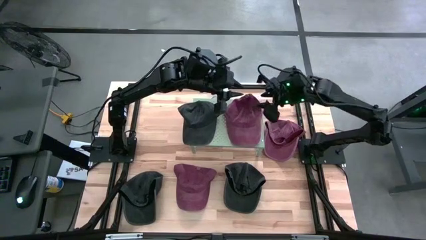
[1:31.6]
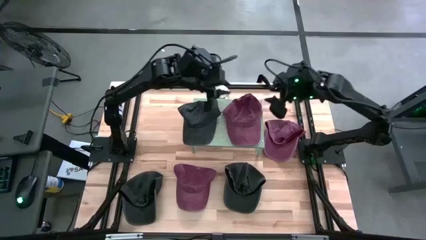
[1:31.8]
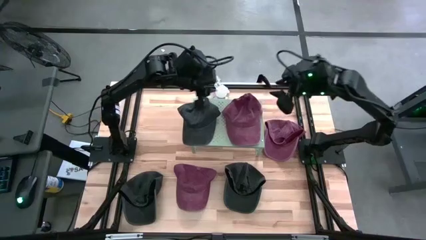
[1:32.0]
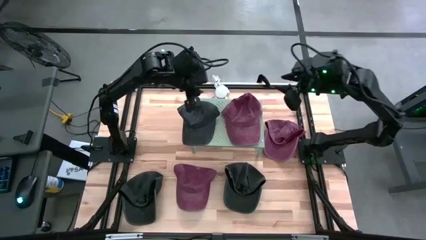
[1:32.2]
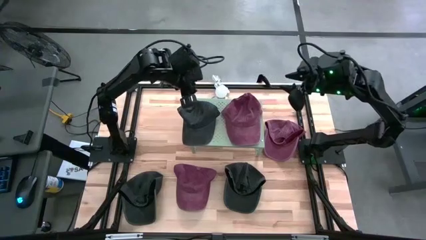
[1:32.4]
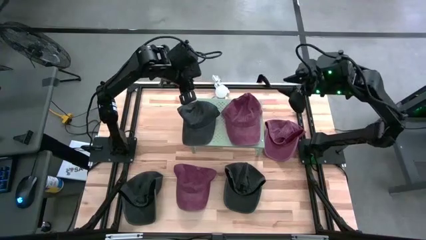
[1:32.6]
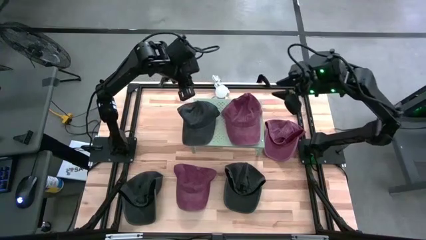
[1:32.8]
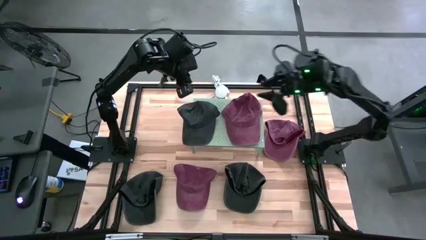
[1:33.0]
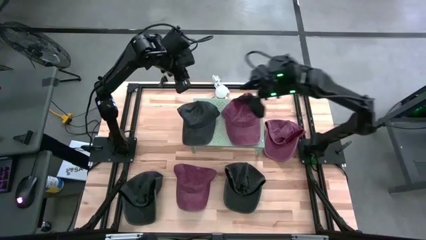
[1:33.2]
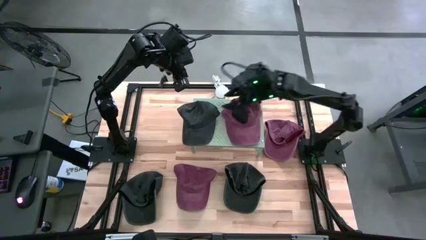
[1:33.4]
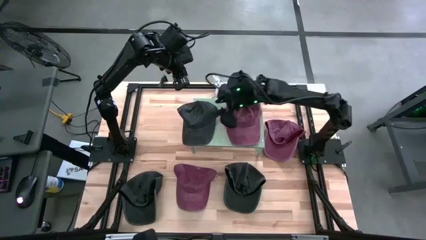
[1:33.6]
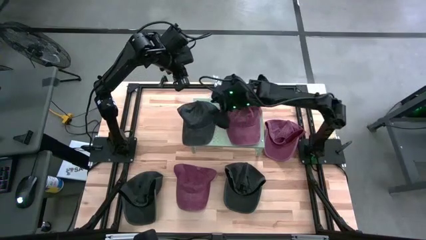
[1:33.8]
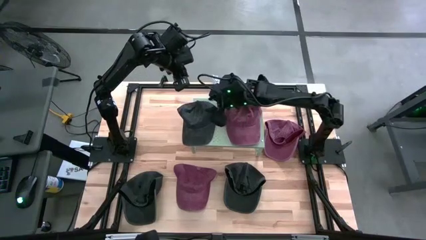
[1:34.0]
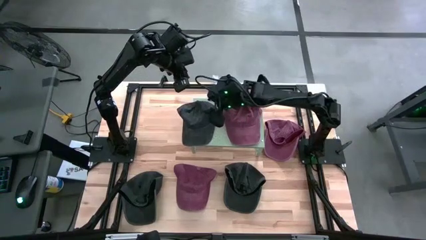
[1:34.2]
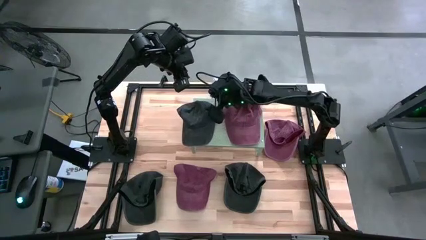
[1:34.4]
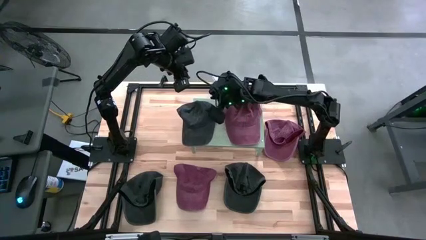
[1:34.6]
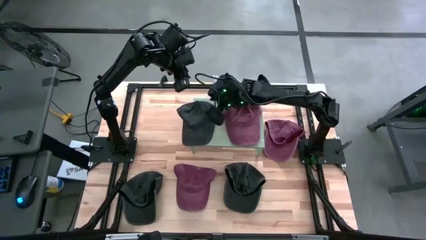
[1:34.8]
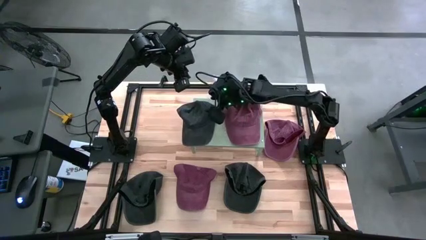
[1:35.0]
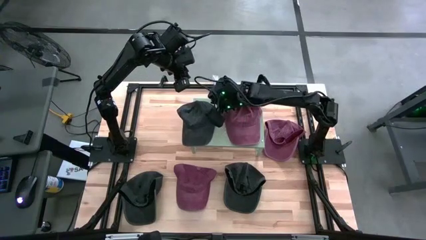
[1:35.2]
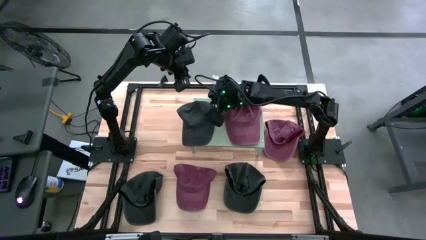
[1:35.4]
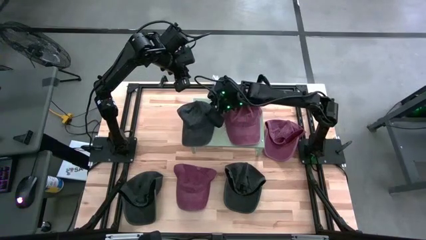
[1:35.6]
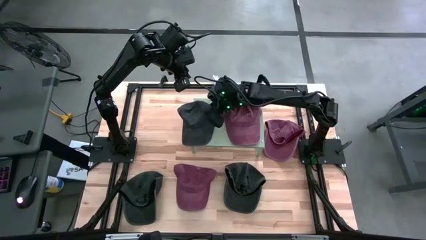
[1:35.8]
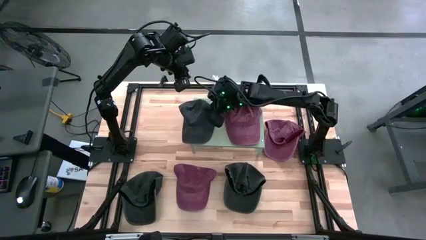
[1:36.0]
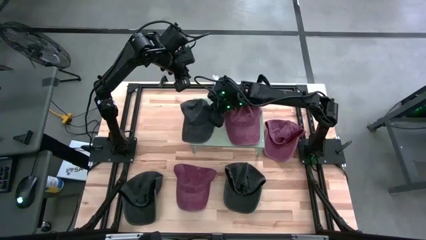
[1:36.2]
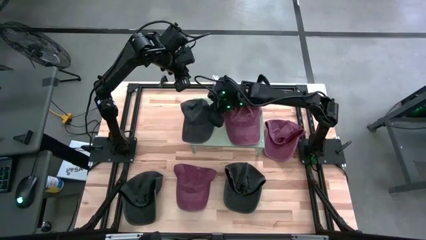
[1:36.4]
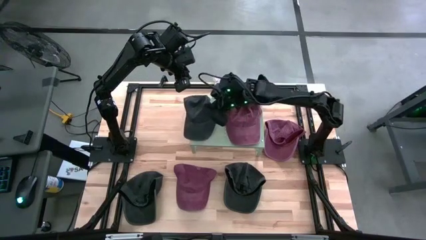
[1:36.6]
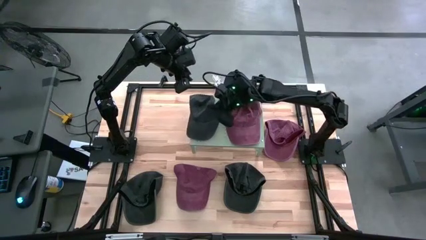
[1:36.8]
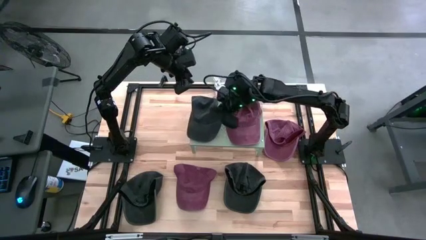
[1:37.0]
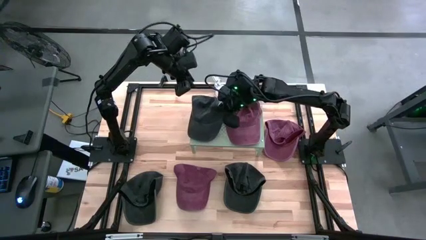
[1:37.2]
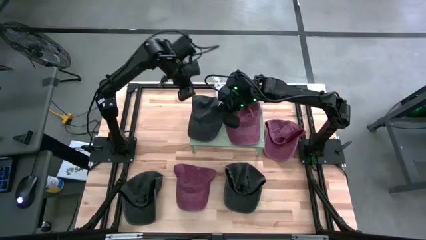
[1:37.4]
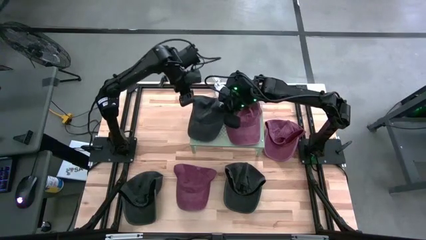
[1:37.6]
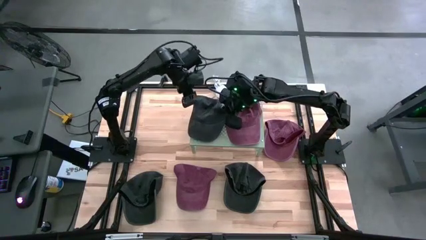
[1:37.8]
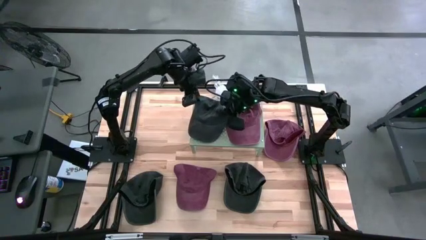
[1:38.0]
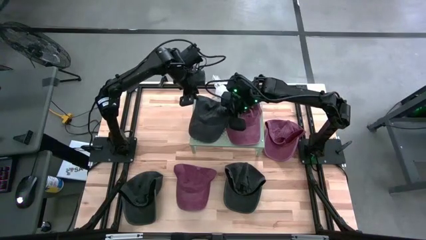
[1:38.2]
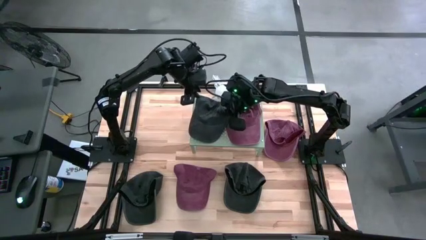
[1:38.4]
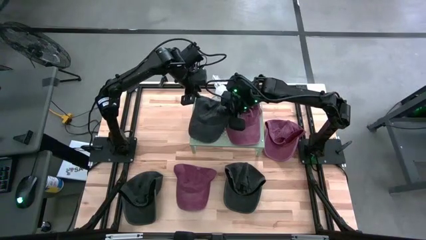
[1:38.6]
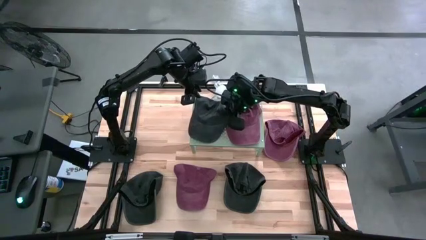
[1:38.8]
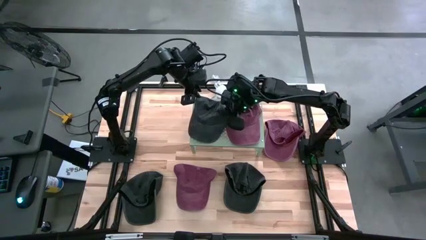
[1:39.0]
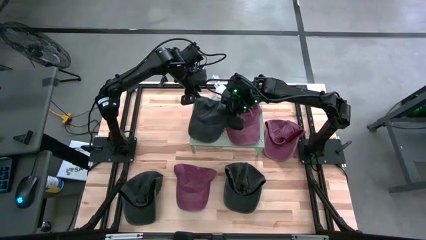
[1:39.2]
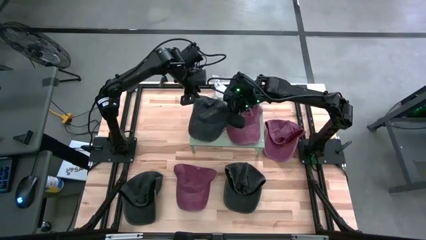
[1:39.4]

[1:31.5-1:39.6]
Task: Pick & Place hat
Adjust the black cap on the shelf

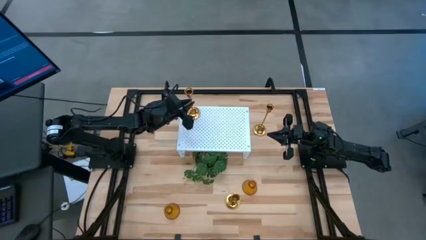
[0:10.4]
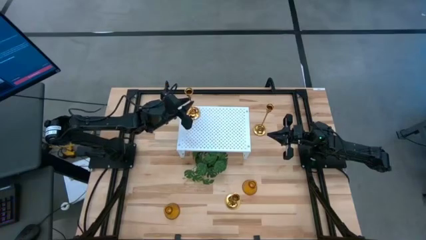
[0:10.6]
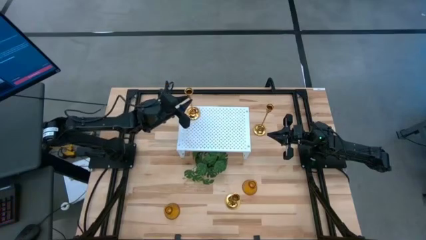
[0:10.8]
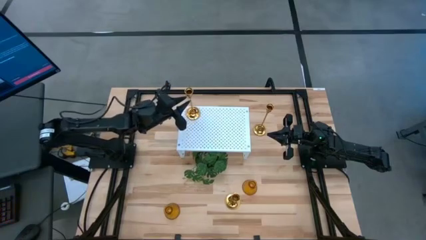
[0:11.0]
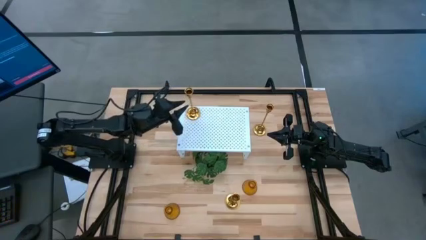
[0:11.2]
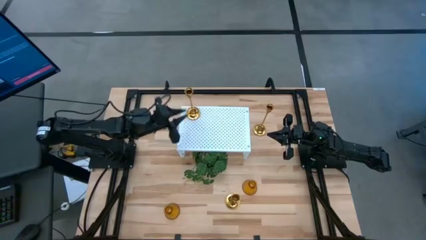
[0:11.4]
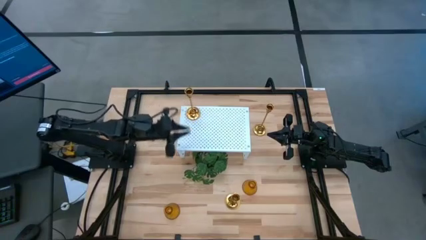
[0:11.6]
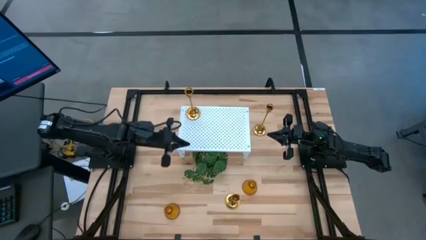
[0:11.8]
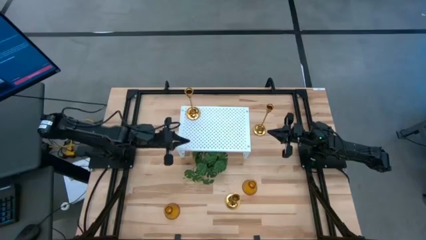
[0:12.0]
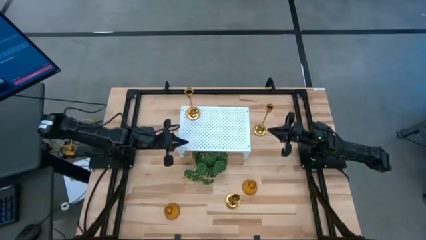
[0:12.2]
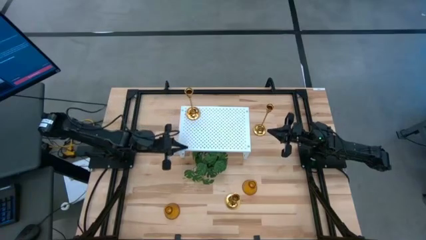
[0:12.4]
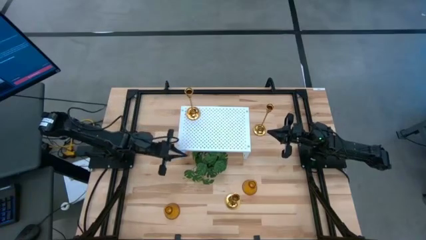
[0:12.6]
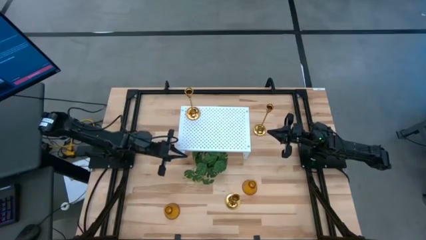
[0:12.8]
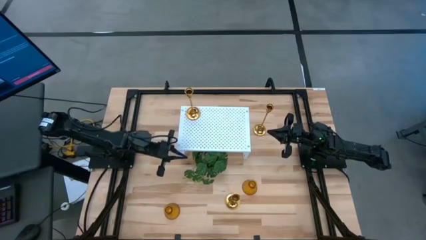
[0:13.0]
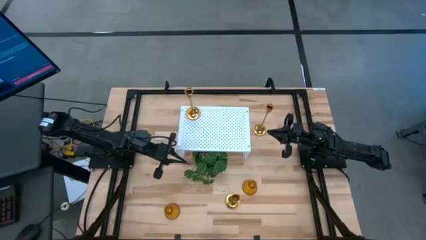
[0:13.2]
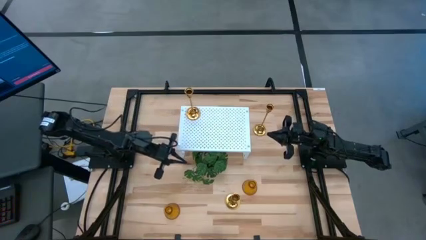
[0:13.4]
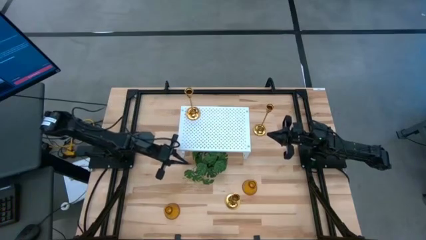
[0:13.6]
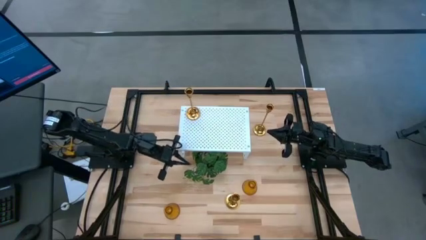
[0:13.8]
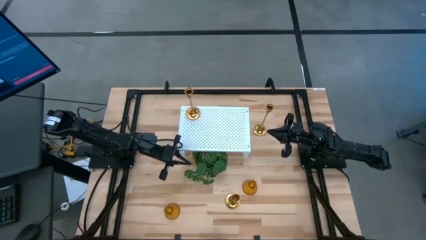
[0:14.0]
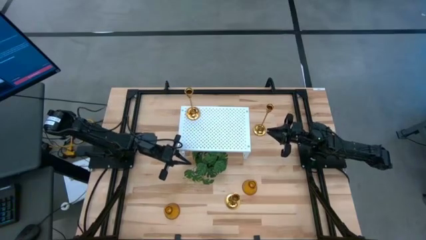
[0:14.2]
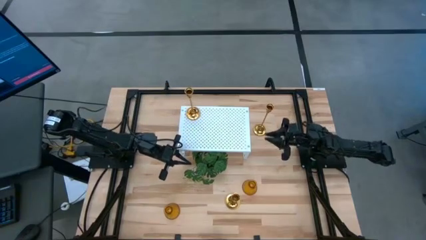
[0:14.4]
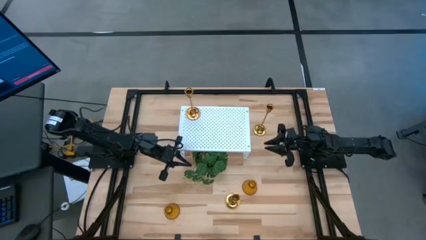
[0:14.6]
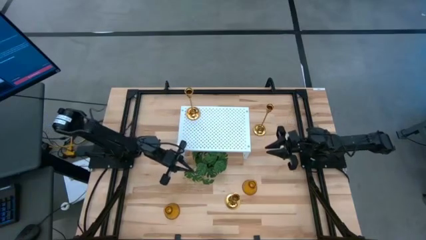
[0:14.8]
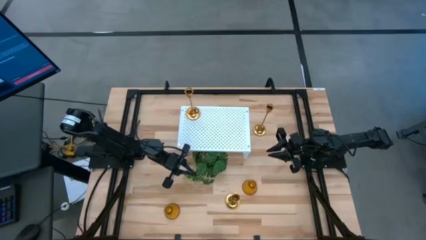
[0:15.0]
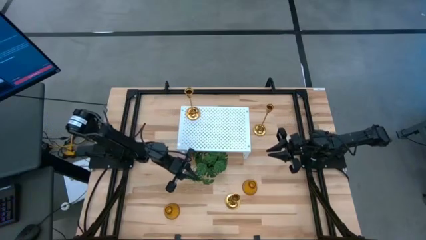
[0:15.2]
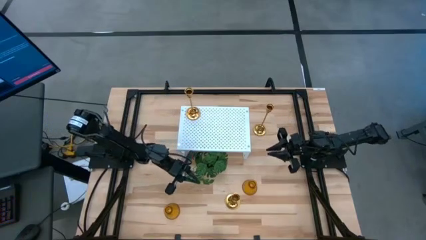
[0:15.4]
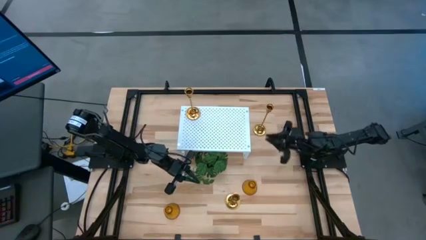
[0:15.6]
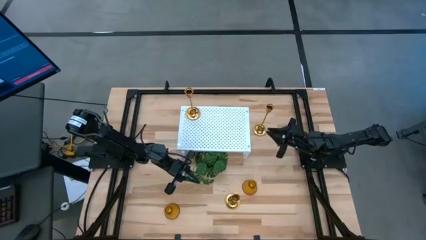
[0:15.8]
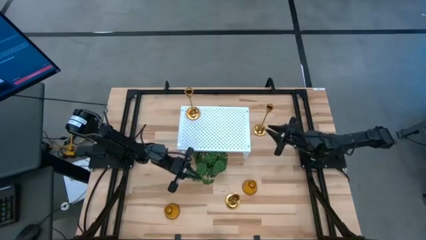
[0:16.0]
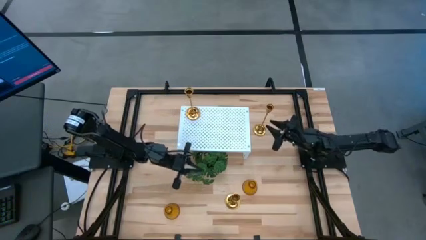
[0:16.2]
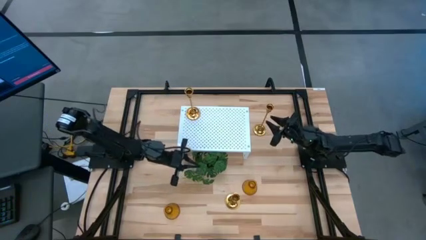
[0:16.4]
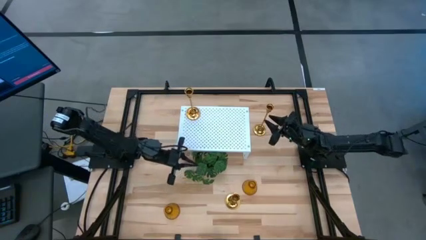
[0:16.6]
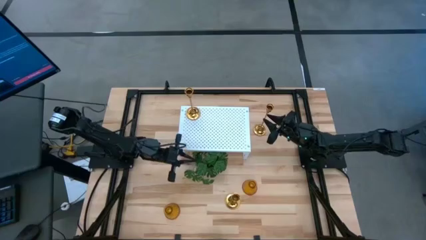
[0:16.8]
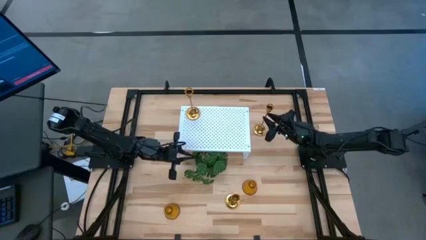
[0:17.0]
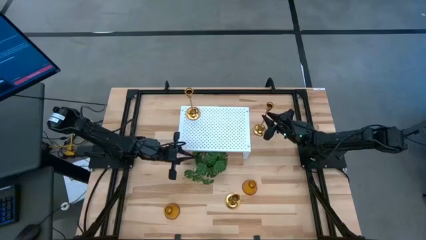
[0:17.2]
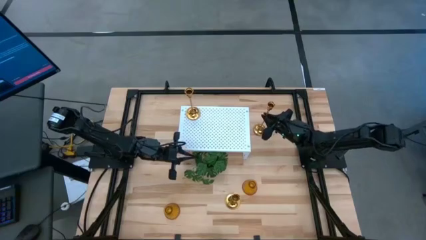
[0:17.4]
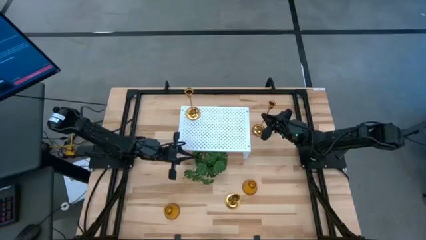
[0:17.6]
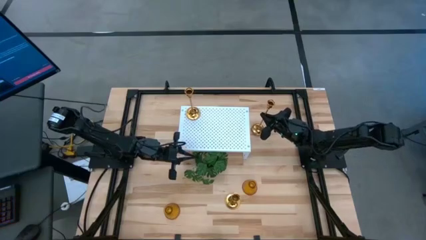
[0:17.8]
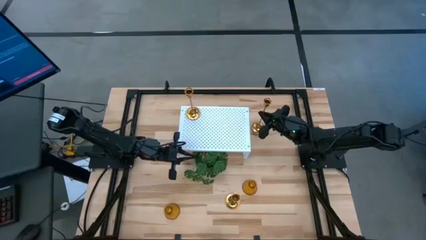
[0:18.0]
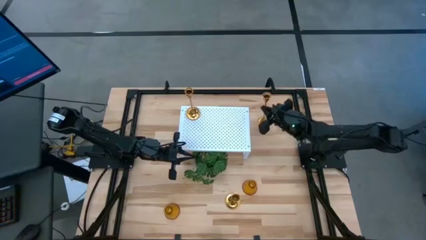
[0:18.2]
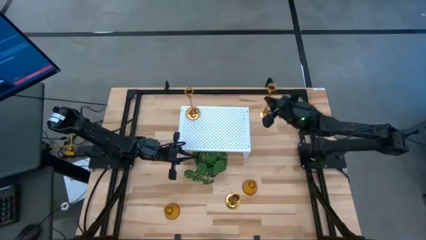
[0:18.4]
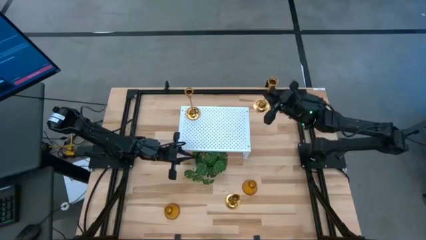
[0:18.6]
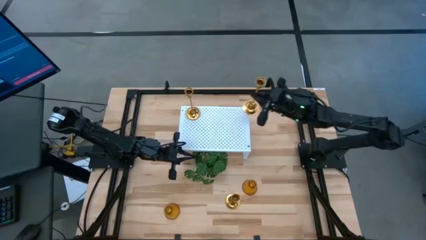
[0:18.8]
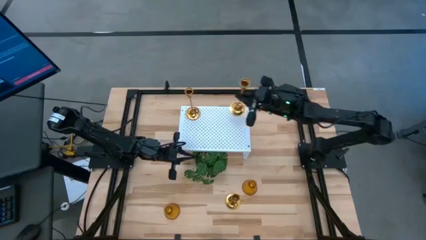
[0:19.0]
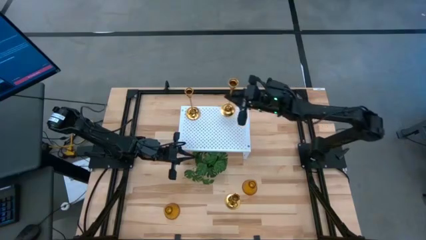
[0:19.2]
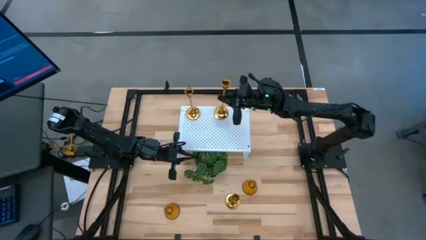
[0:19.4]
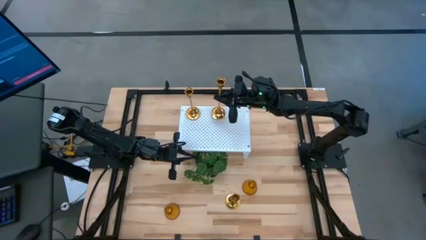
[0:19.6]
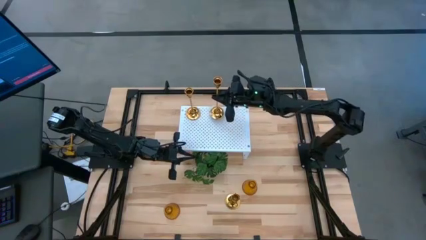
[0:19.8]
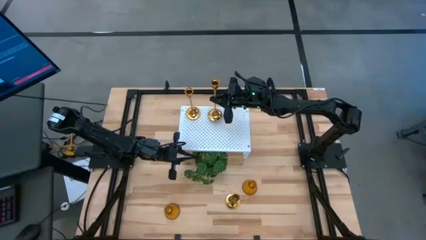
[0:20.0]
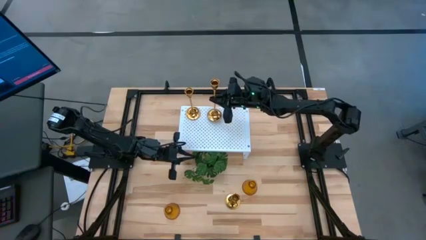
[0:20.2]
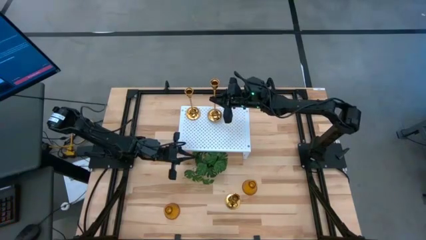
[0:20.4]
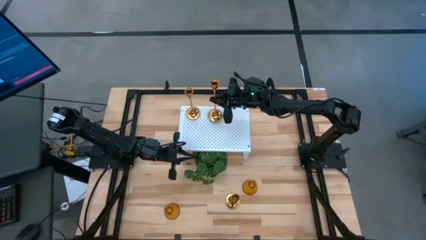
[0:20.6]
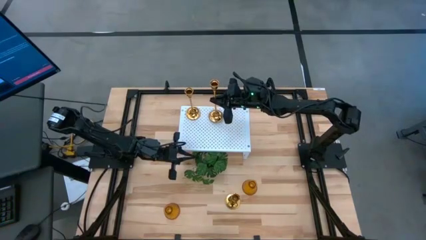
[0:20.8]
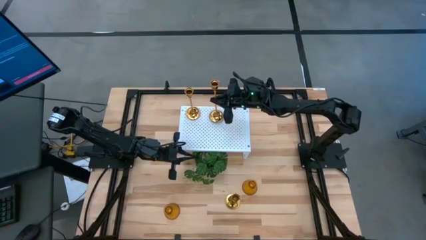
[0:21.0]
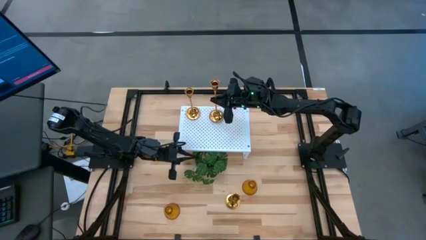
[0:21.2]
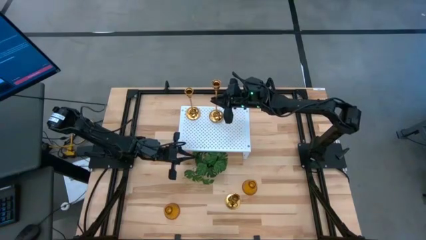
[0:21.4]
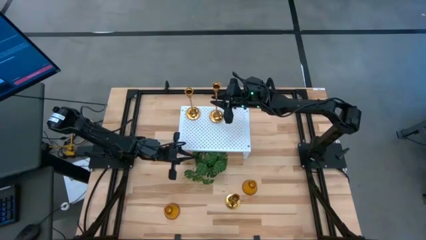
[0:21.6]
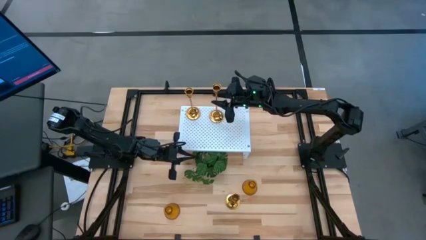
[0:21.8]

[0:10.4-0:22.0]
Task: Pick & Place candle stick holders
Put the top gold candle holder on the shelf
